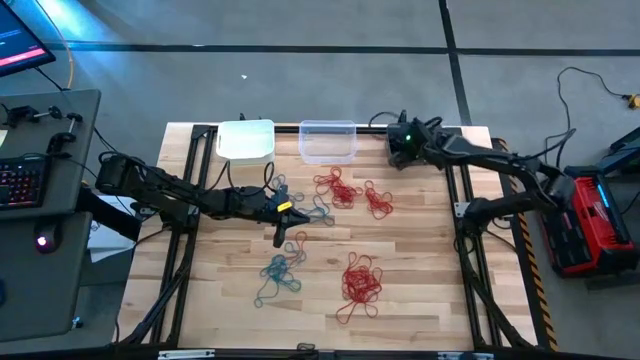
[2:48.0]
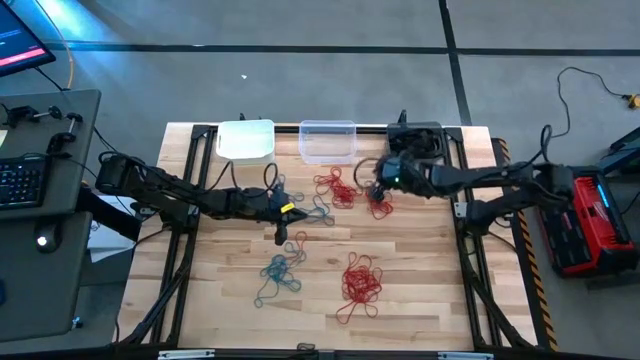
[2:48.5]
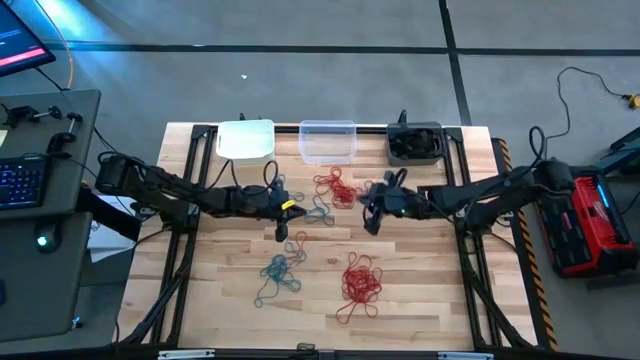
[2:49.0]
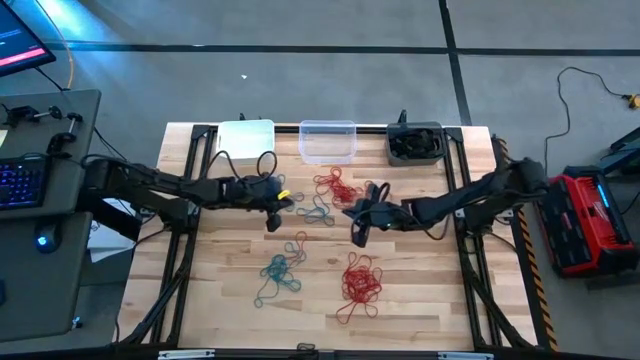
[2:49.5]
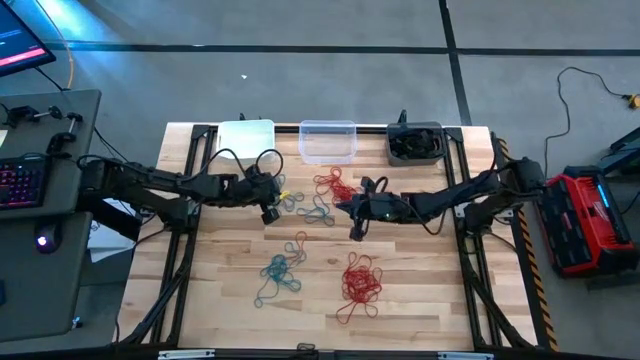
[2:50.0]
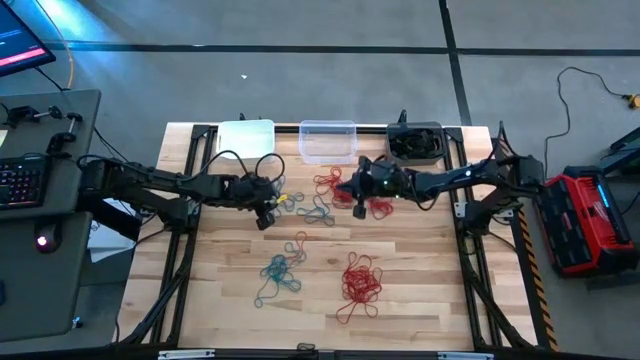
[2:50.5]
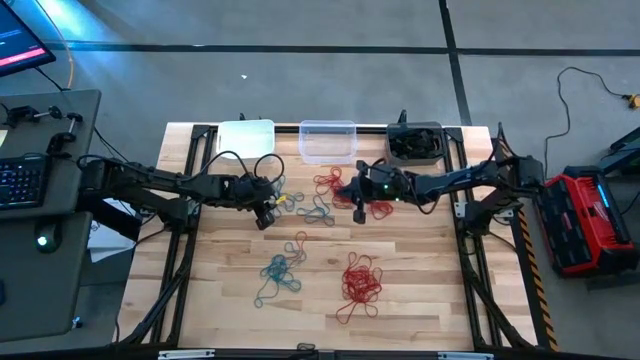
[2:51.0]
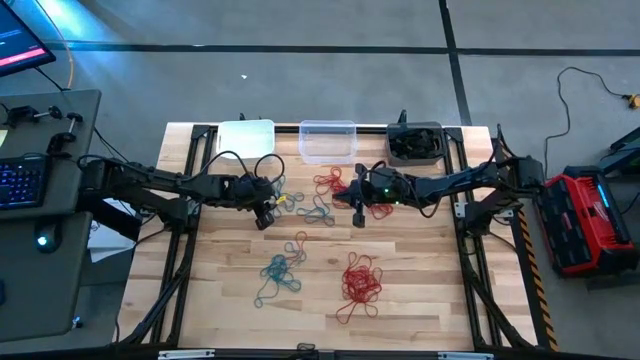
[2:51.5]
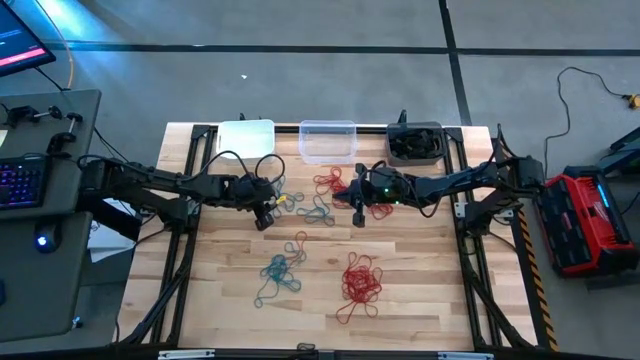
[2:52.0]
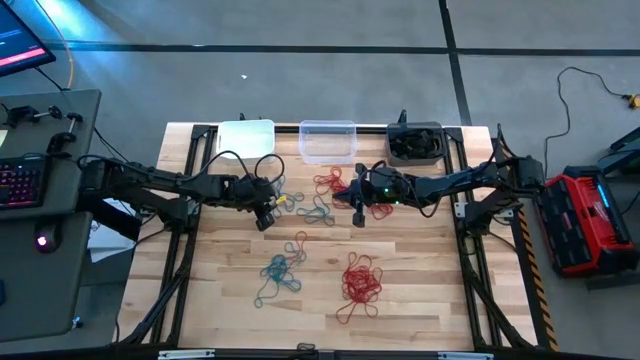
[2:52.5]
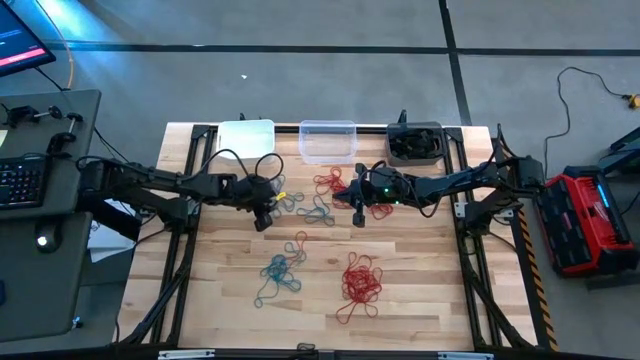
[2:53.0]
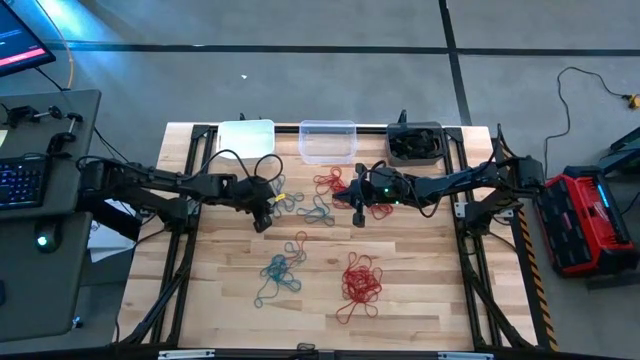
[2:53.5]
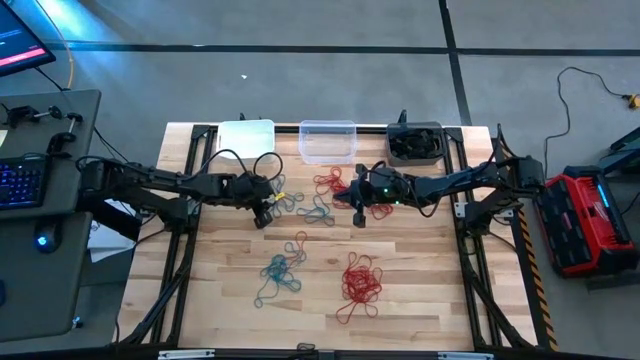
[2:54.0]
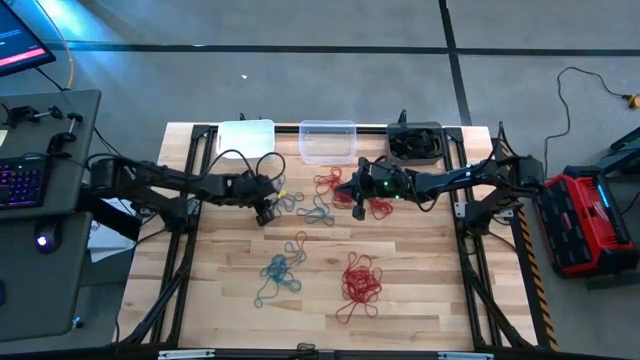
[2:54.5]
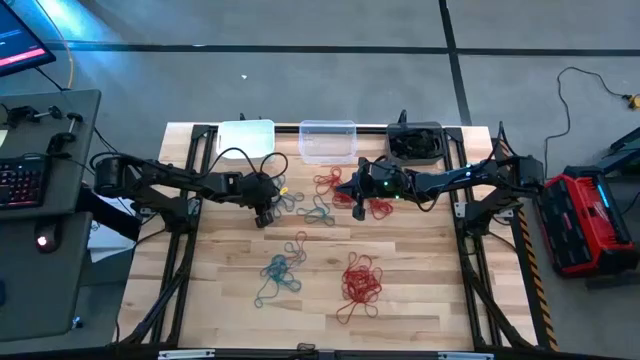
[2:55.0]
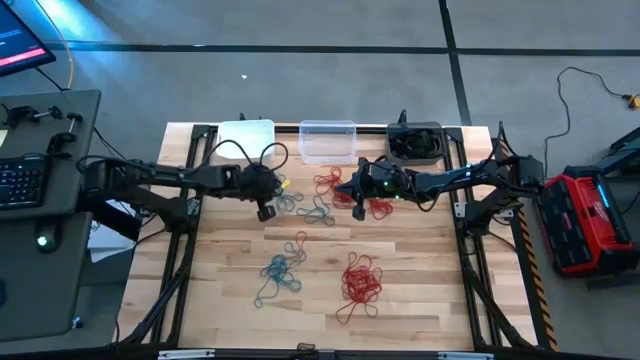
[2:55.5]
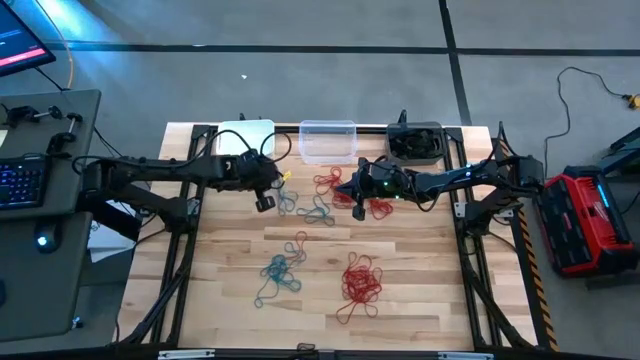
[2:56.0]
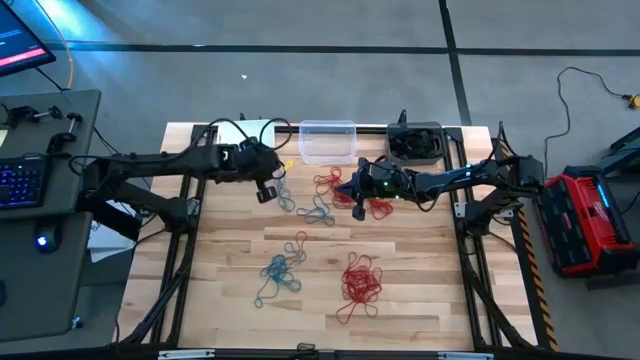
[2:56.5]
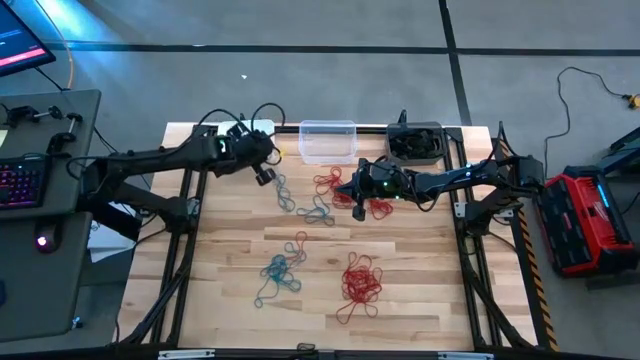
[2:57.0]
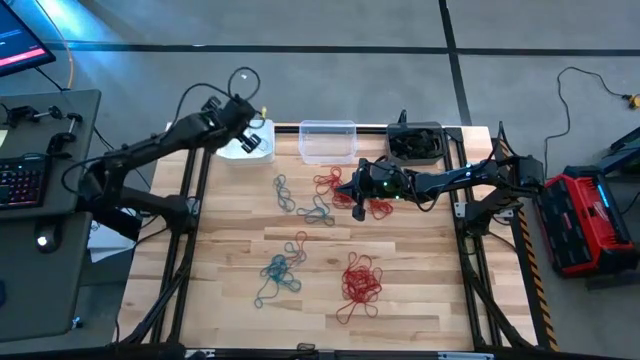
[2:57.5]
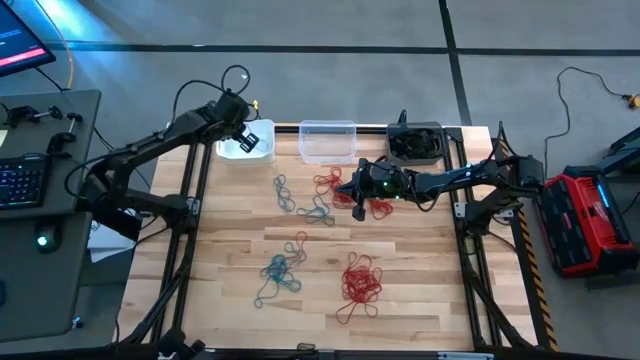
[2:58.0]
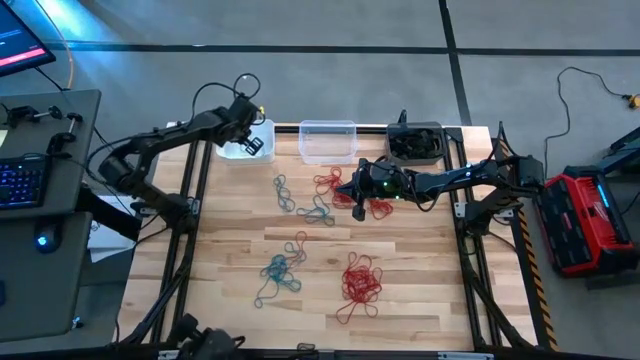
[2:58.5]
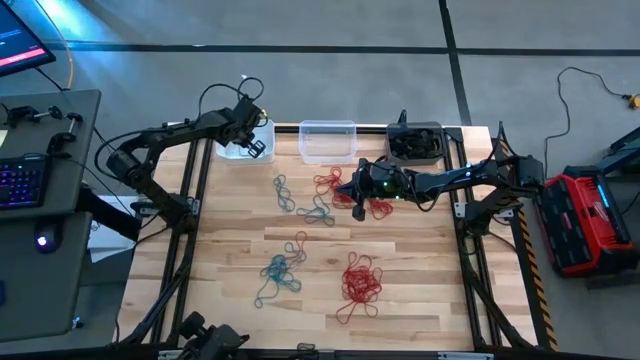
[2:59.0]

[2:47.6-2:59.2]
Task: Sort rubber bands into baskets
Put the blue rubber band into the white bin

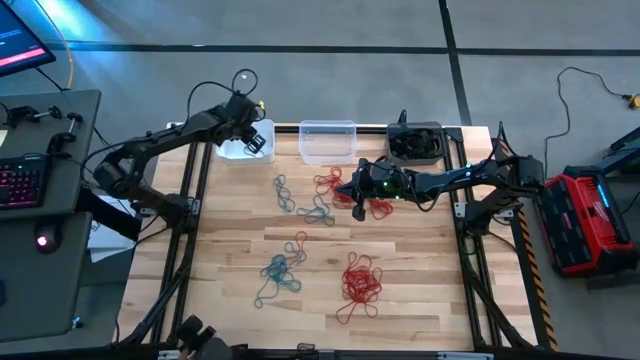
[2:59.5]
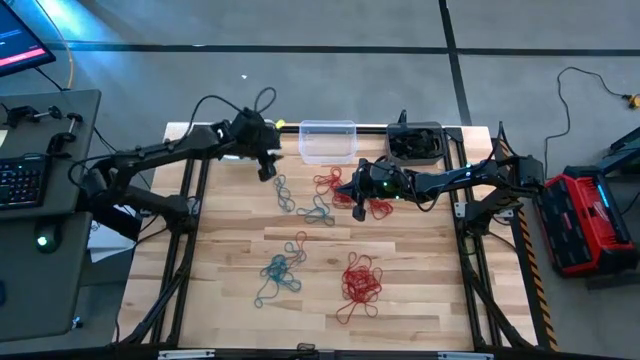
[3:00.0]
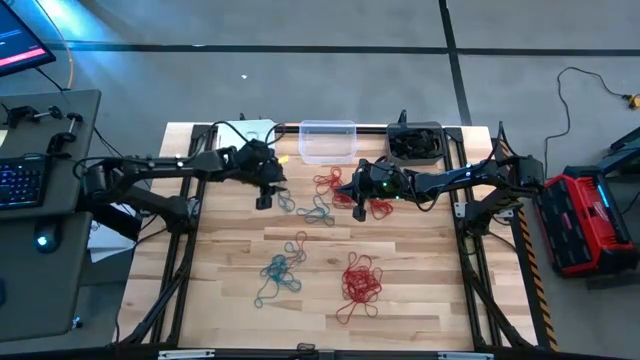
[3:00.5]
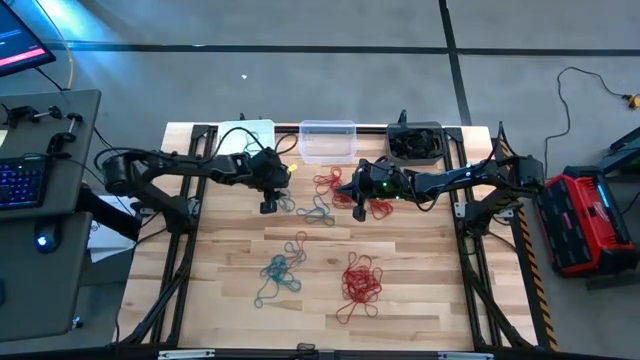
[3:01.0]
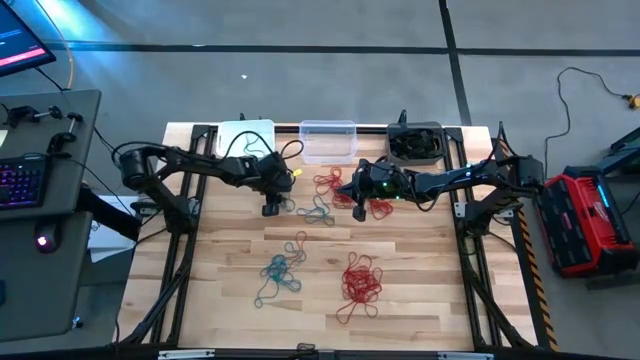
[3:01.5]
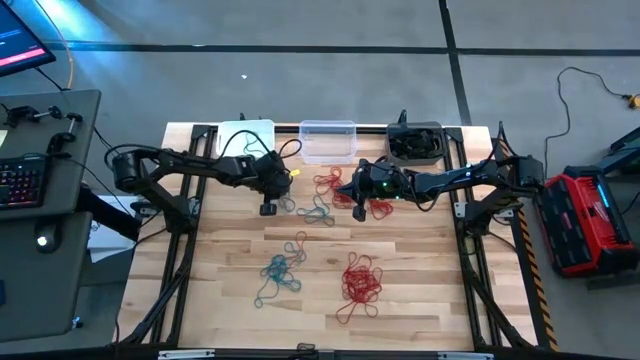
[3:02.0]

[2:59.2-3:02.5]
Put the blue rubber band into the white bin

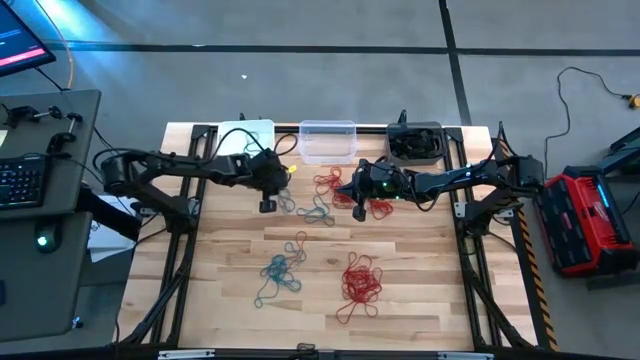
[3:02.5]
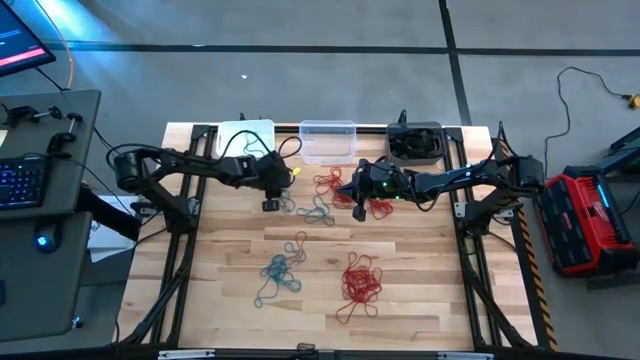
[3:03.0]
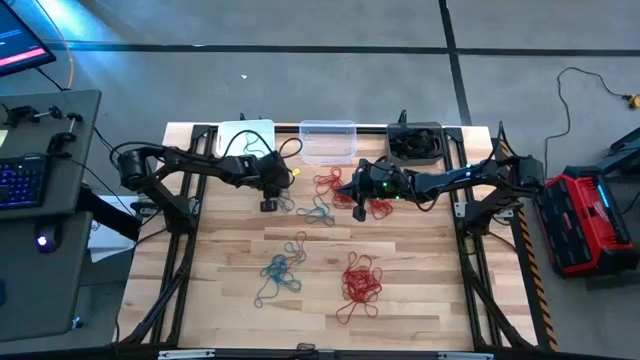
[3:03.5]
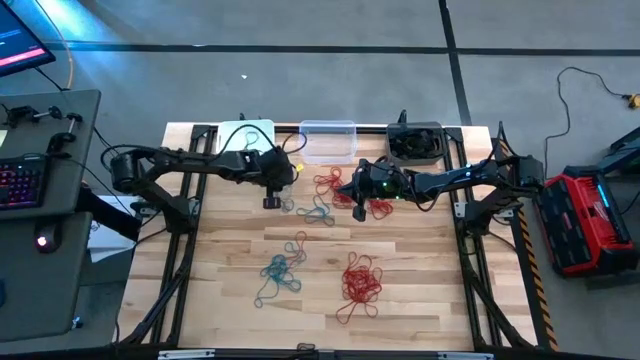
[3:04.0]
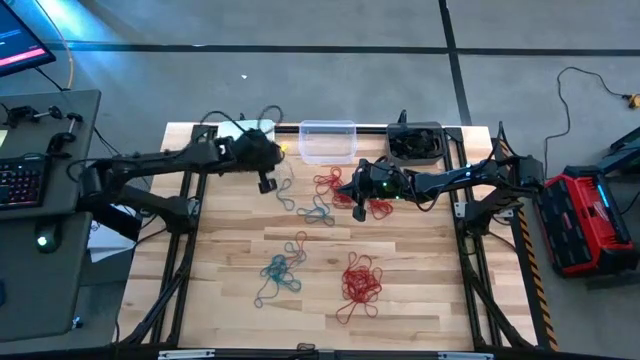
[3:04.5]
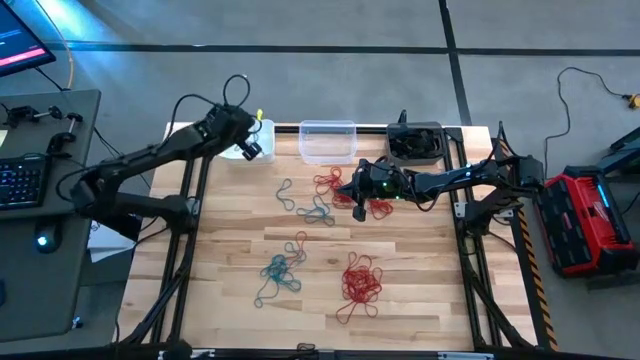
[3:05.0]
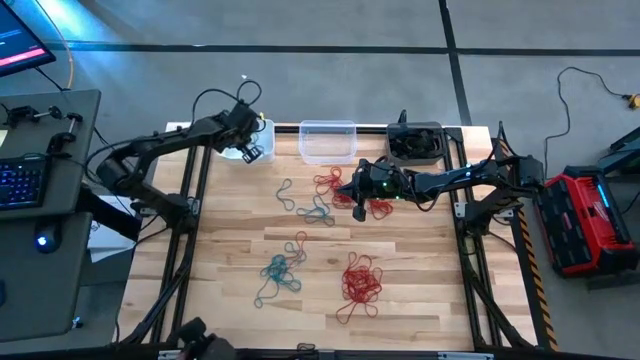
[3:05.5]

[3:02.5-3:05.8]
Put the blue rubber band into the white bin

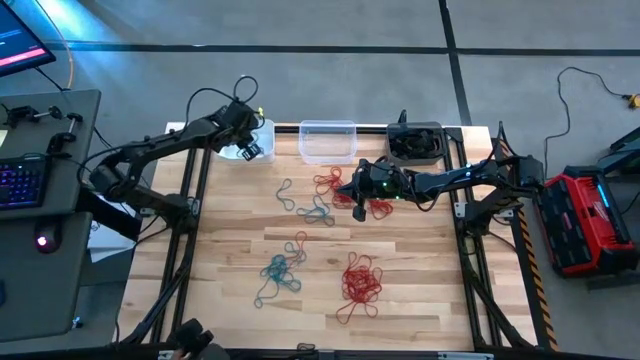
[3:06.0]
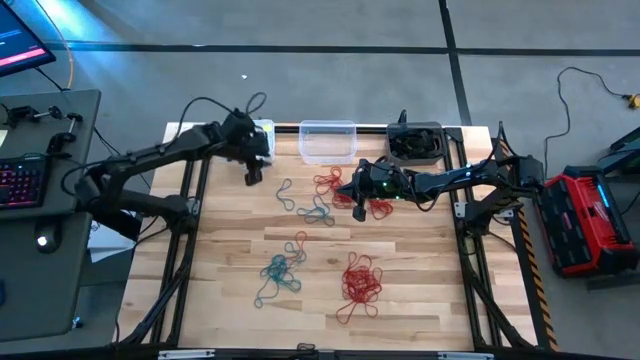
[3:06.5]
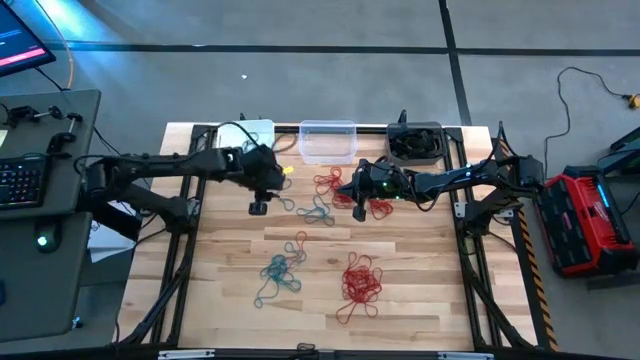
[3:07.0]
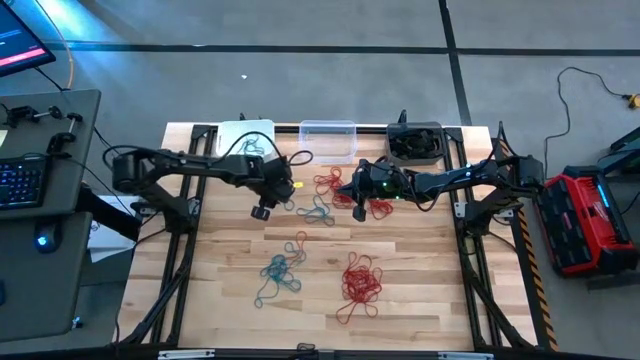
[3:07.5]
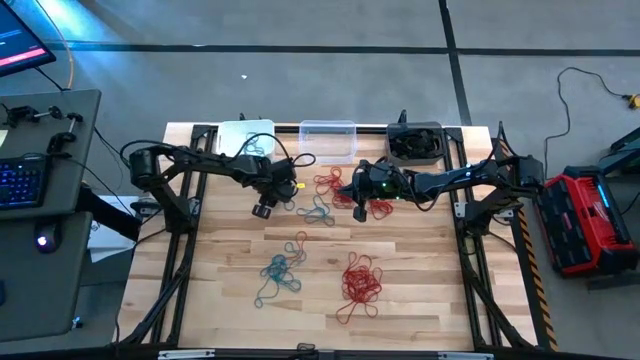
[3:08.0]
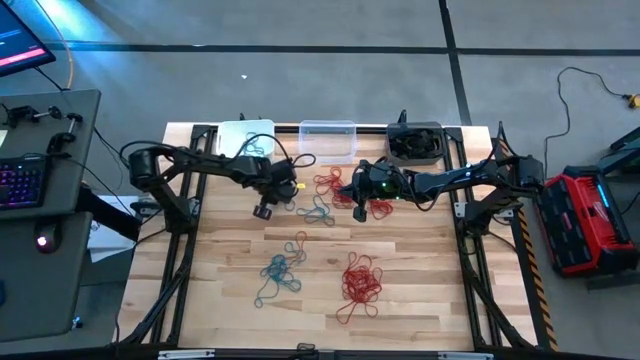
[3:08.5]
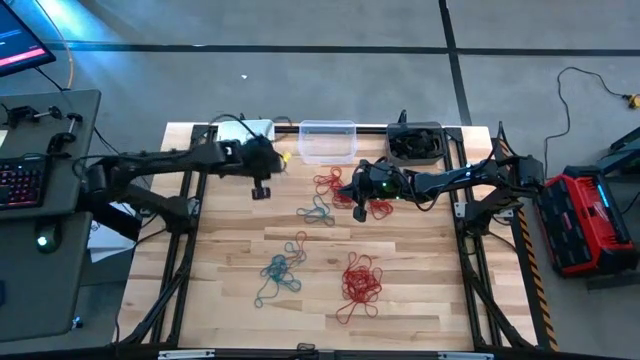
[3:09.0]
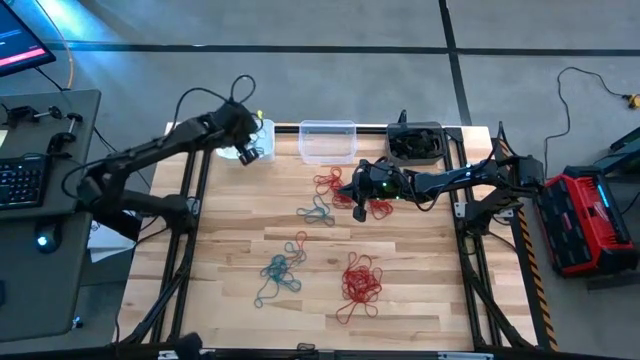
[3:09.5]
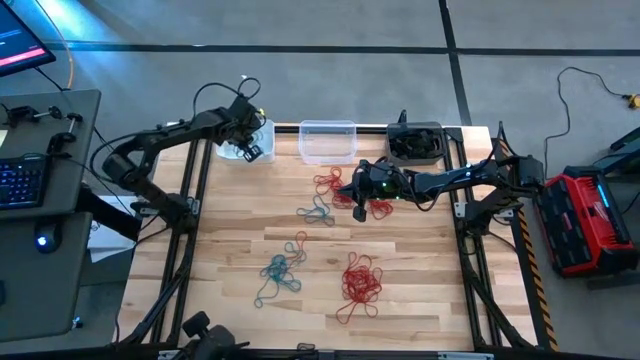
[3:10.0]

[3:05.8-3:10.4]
Put the blue rubber band into the white bin
